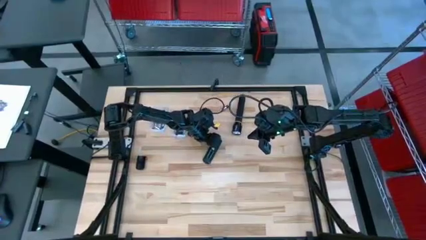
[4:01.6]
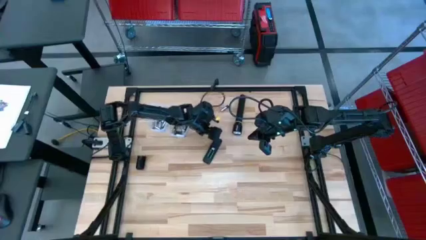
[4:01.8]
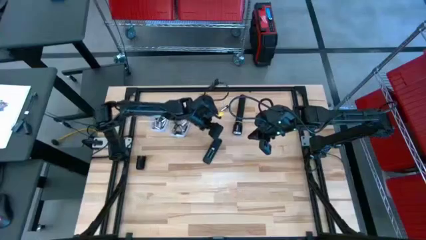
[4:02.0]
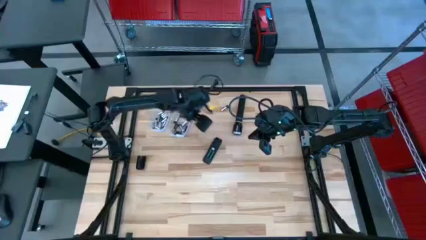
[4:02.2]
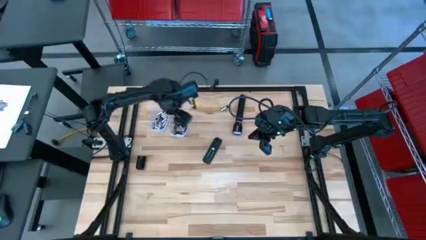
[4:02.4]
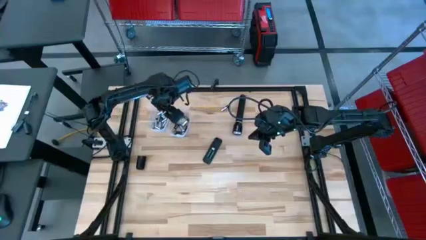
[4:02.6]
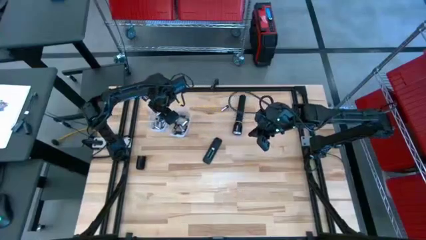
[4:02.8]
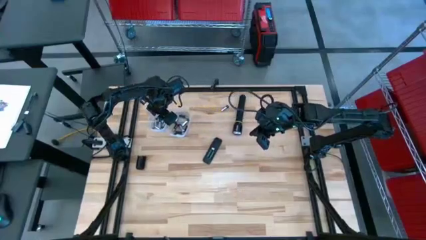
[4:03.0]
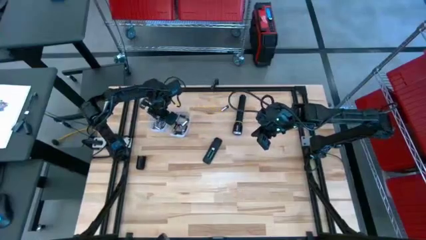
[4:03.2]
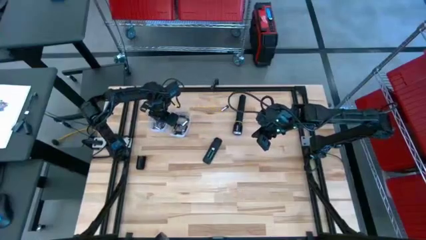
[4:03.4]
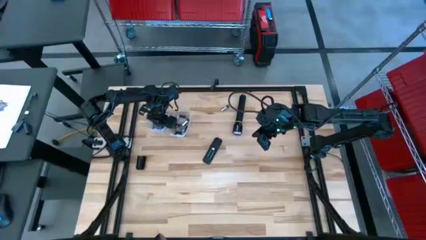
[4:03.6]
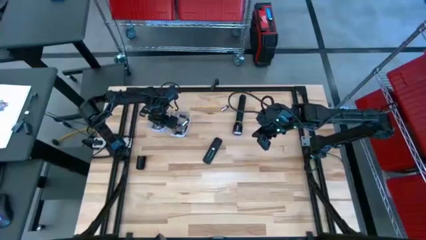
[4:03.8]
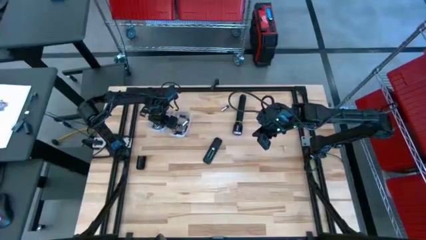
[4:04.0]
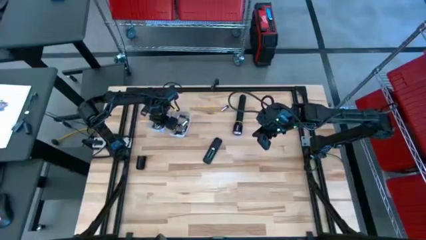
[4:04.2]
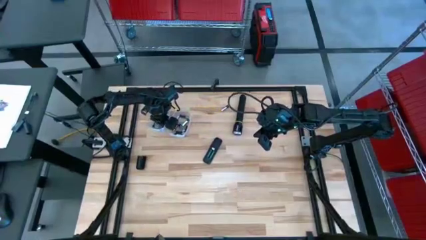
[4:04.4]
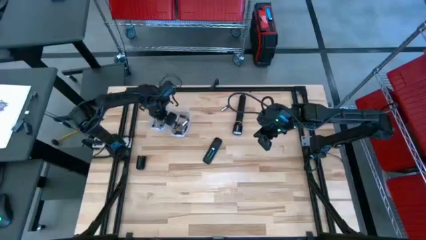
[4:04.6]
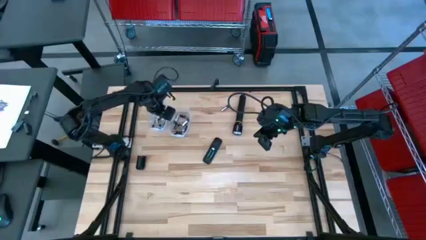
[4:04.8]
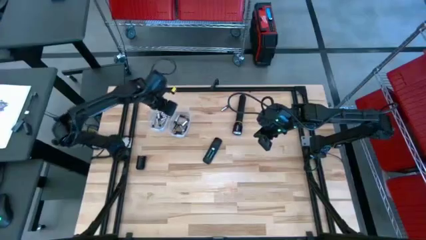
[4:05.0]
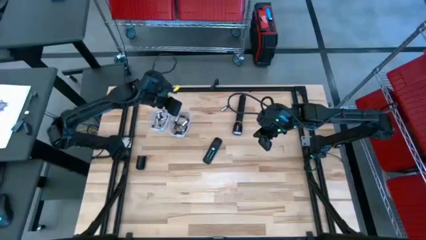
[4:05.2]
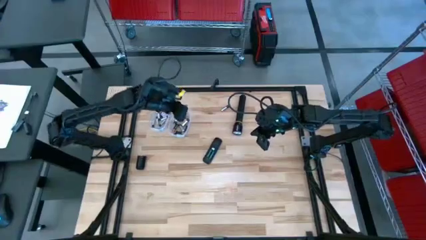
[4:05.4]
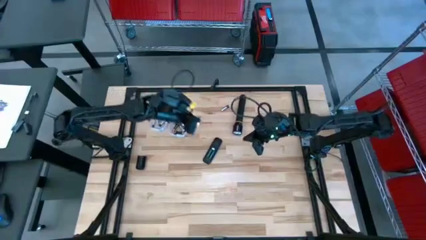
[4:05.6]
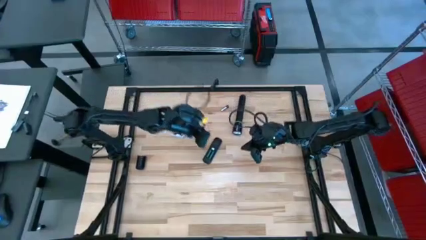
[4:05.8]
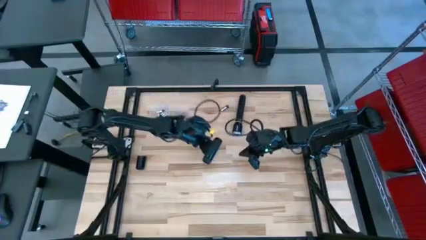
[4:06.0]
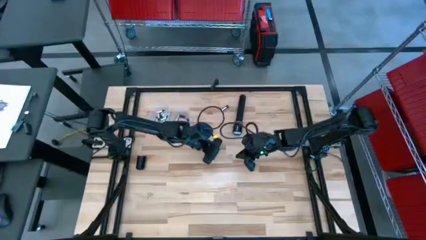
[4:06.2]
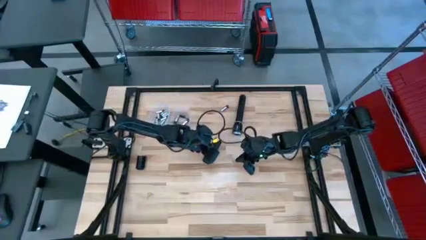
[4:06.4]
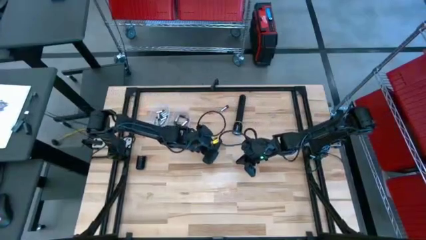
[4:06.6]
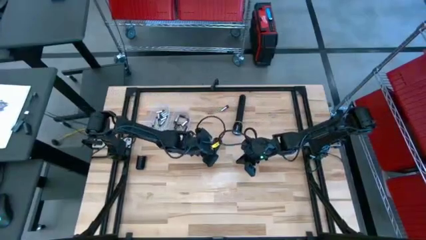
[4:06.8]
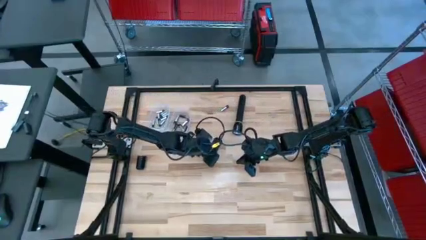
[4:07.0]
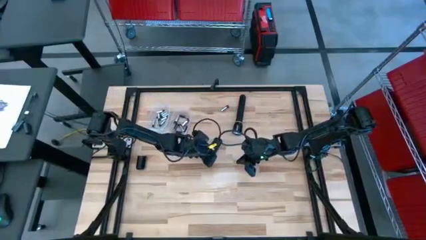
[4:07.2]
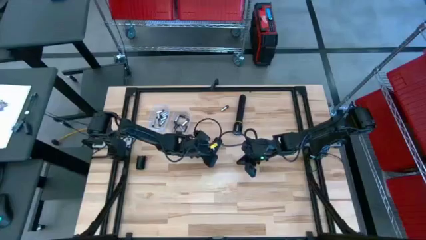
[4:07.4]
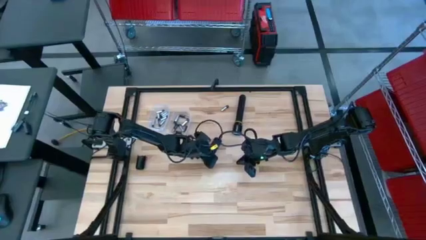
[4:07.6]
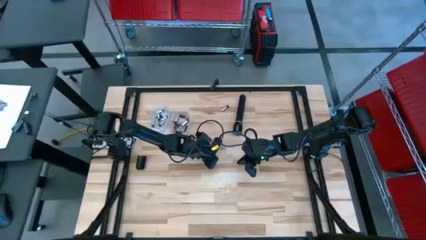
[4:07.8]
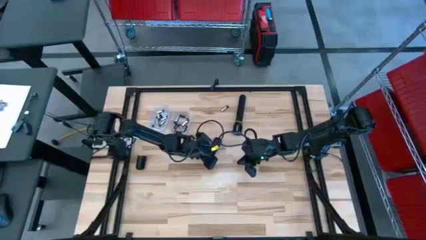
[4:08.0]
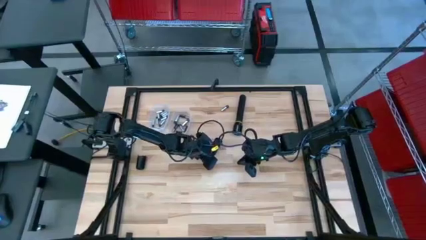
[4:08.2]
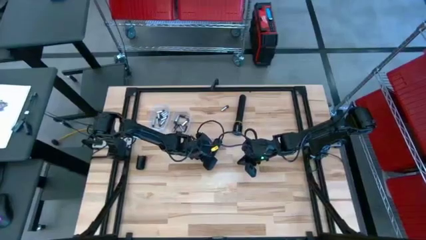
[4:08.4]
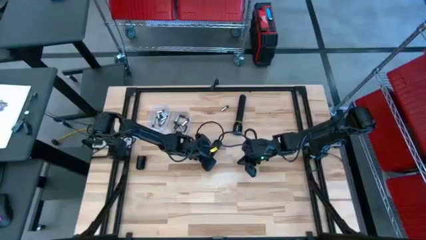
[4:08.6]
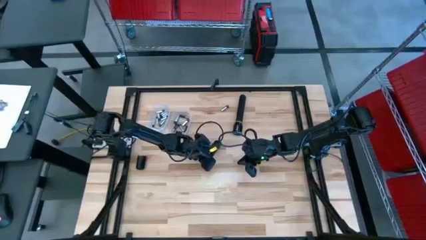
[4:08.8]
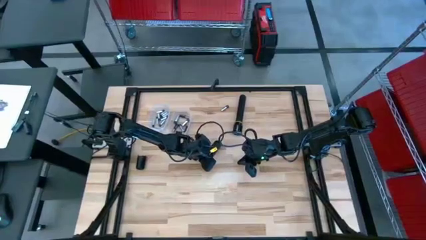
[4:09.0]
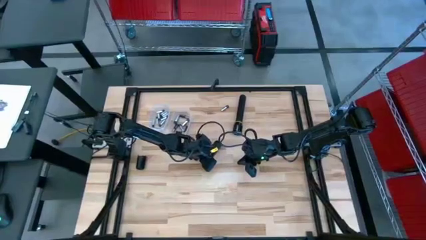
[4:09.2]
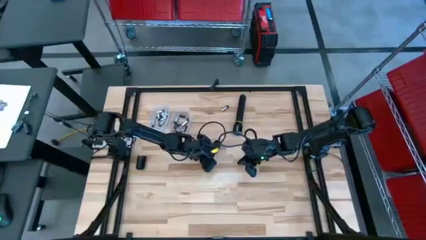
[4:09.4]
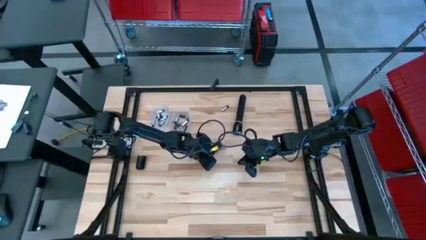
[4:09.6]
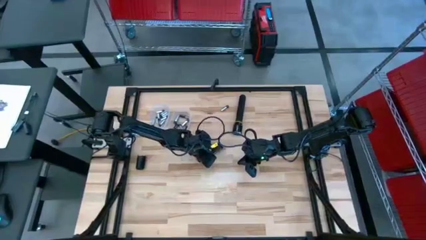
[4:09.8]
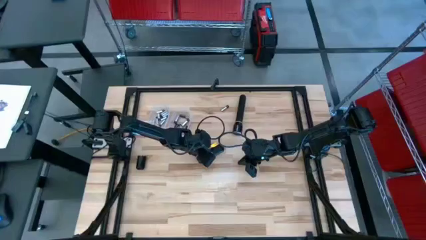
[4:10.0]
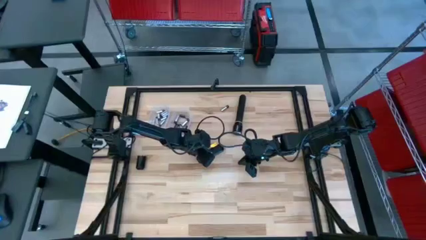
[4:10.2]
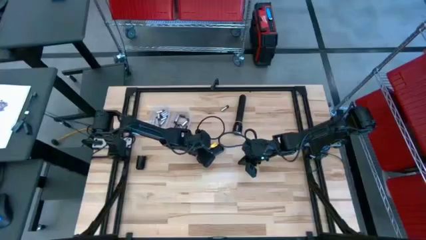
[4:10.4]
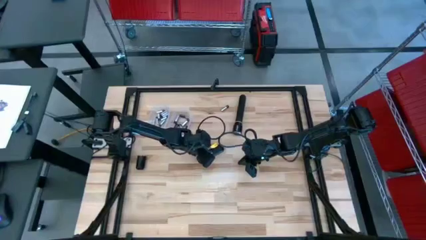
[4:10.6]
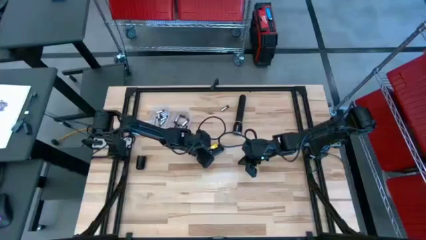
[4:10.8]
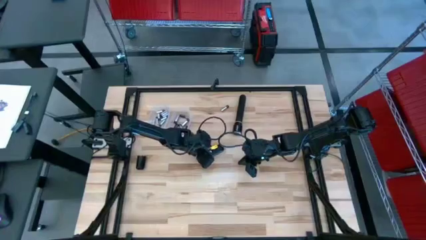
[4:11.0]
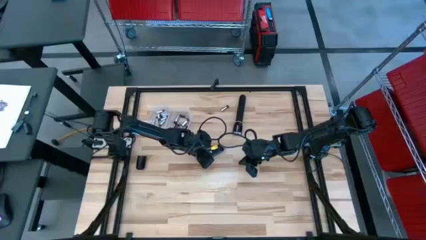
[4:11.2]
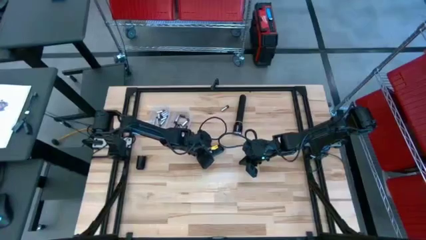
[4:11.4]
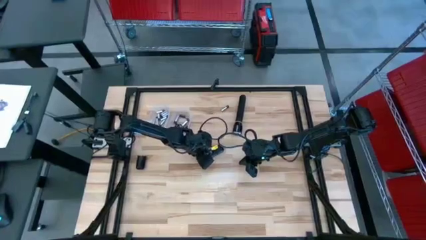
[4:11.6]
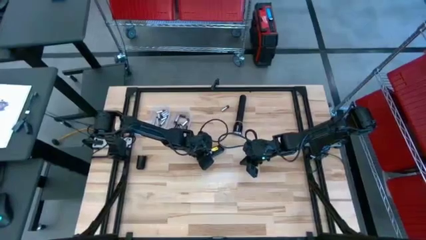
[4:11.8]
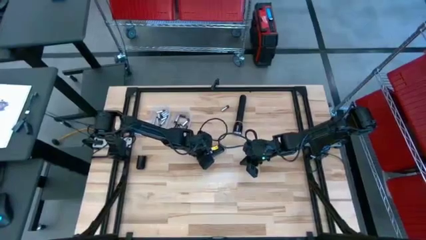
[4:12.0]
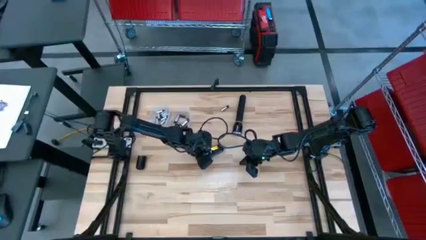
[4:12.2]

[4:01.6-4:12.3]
Task: Insert battery
Insert the silver battery into the remote control battery compartment

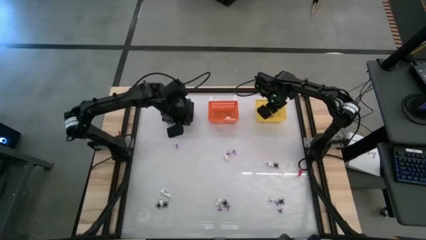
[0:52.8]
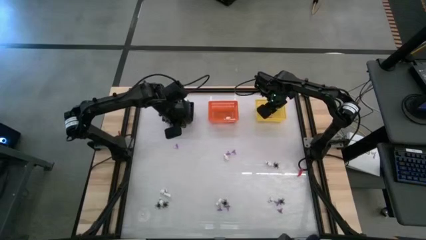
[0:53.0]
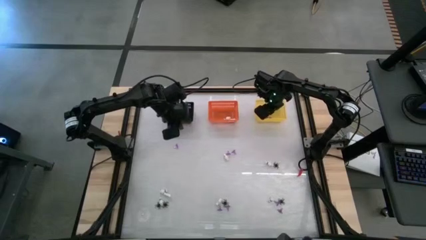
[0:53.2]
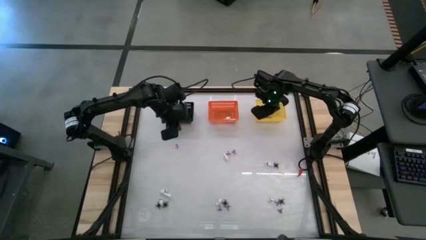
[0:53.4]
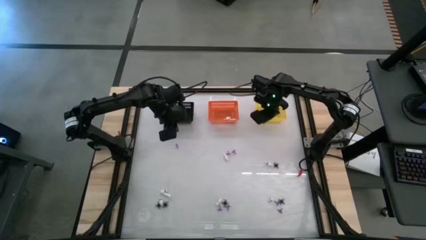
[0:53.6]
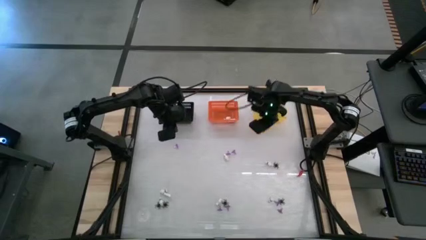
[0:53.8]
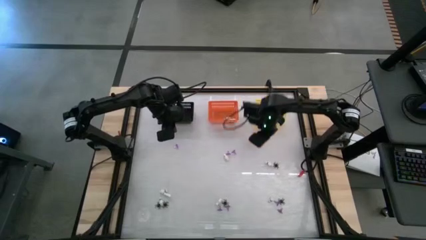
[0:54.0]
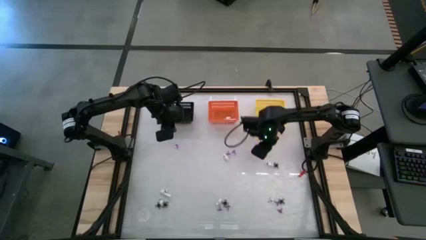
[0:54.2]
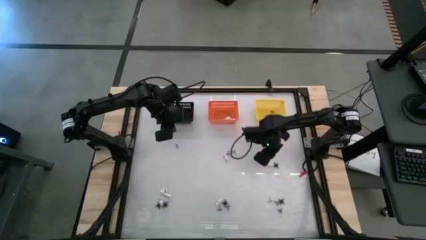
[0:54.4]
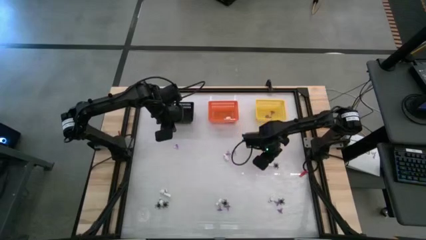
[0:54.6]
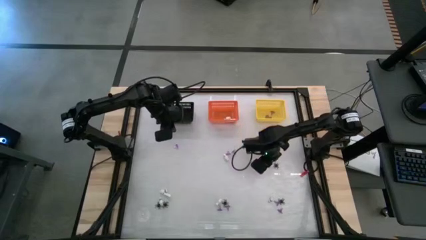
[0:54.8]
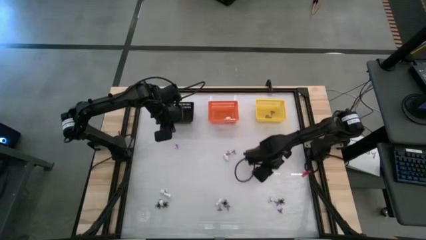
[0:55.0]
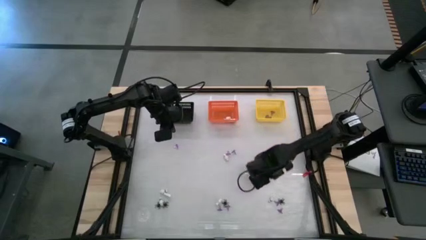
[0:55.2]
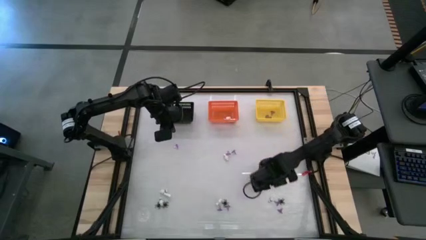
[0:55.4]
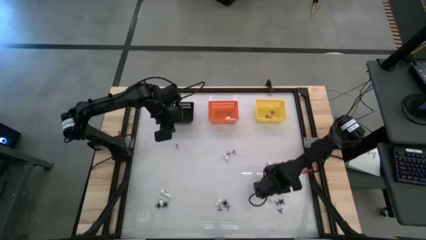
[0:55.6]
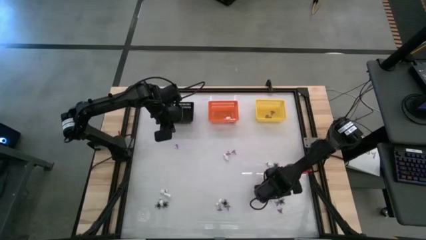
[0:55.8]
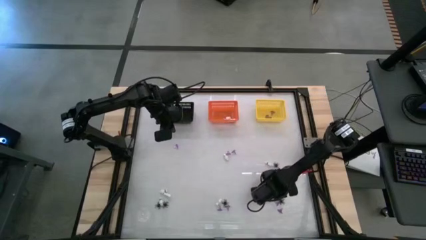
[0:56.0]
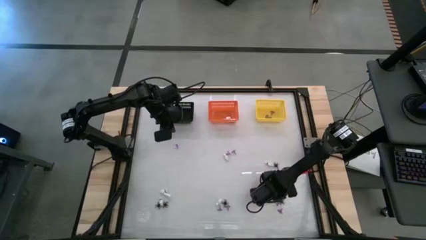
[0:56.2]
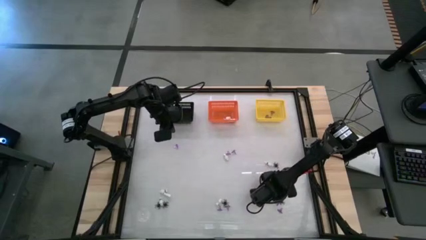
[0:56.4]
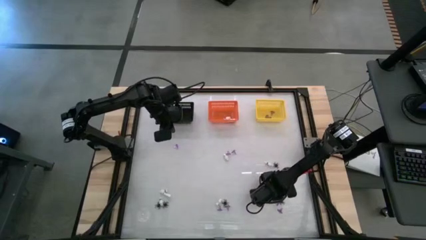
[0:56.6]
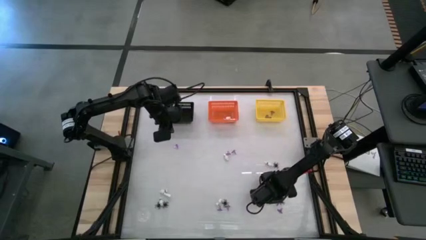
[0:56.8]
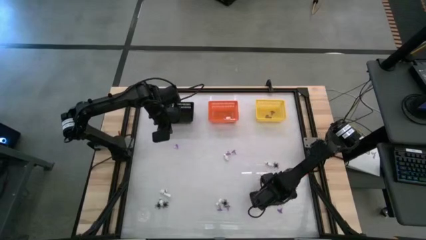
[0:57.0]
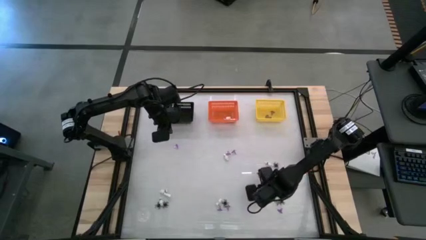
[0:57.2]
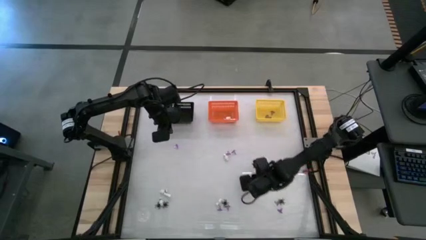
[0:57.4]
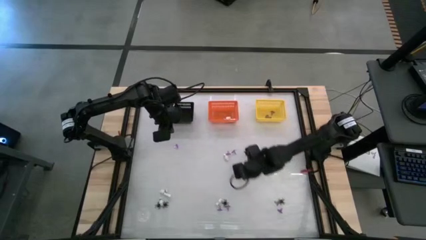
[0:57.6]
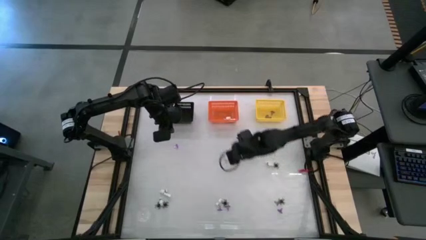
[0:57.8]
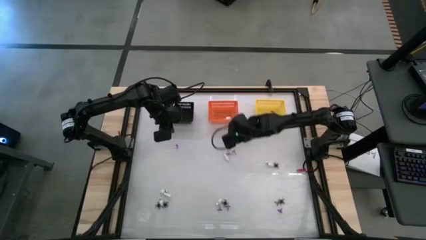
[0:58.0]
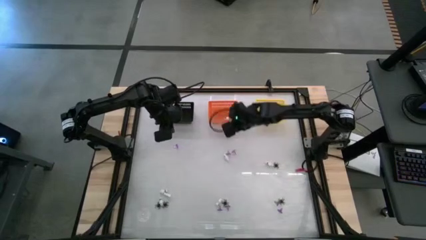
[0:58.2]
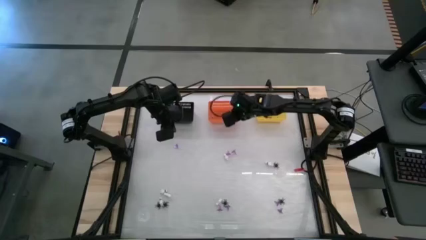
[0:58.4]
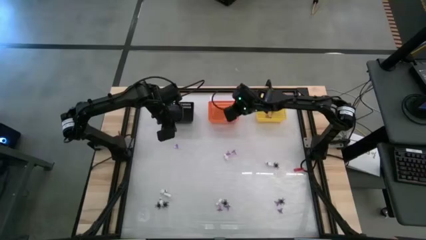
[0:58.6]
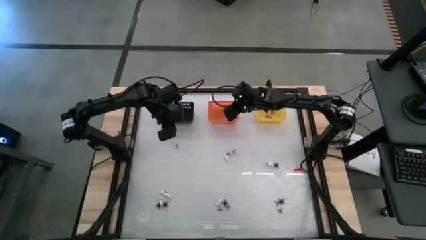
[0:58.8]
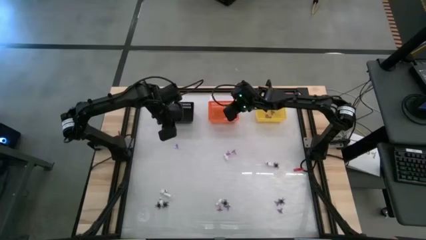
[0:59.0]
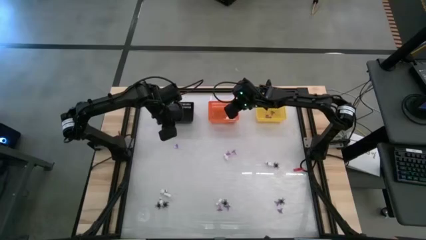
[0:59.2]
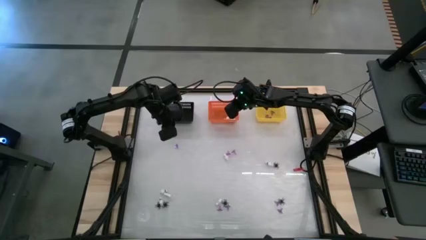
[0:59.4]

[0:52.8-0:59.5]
Task: Sort Halloween decoration
Put the skeleton toy into the orange bin
